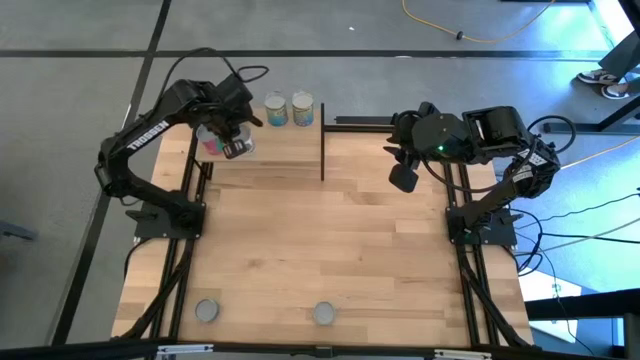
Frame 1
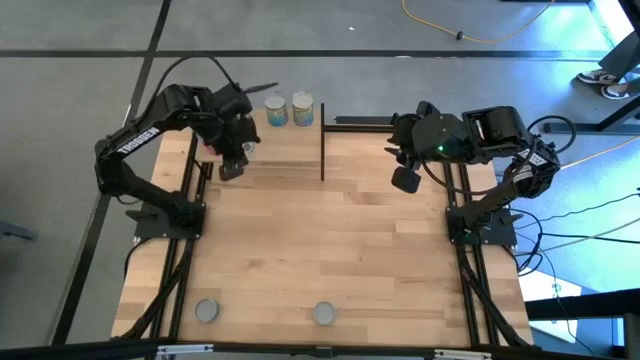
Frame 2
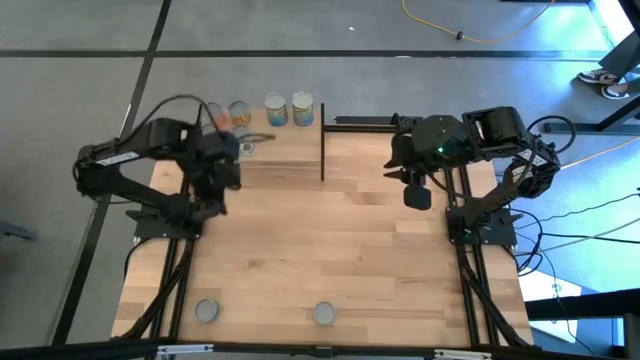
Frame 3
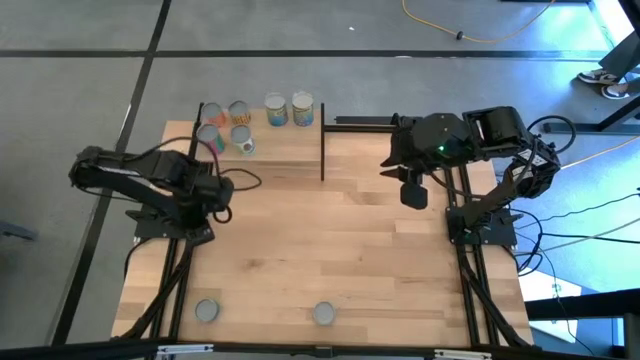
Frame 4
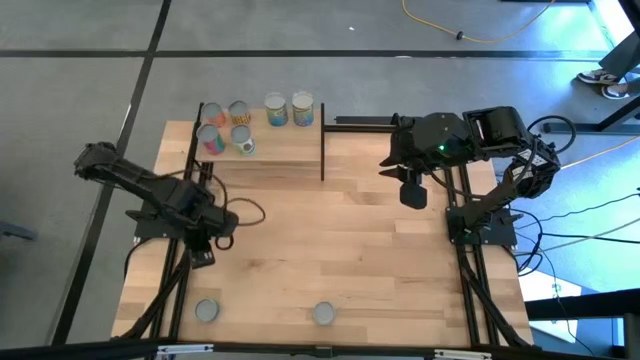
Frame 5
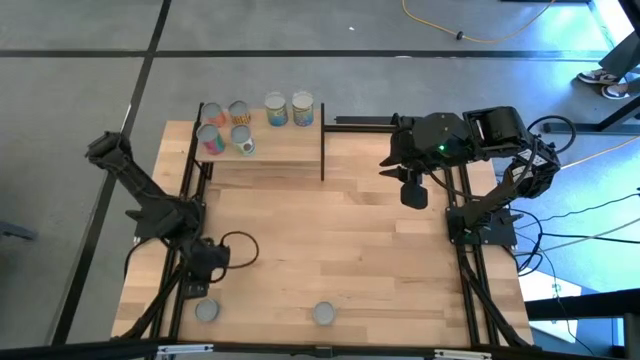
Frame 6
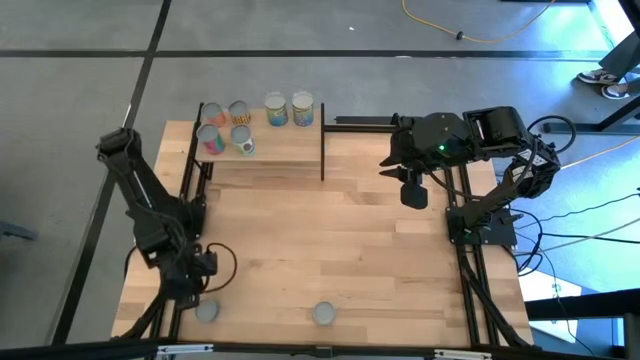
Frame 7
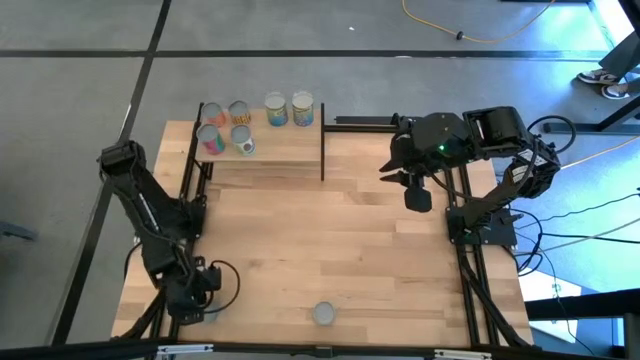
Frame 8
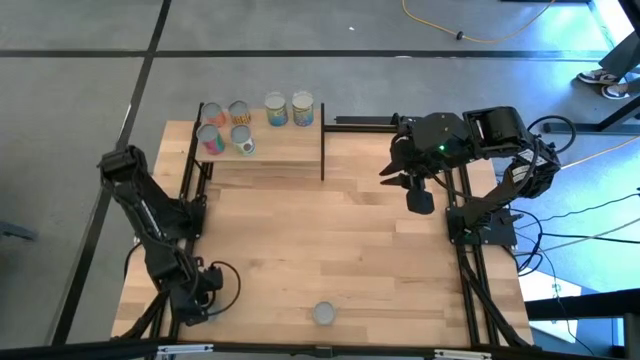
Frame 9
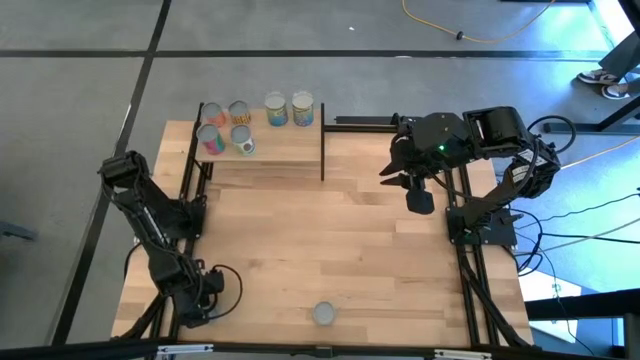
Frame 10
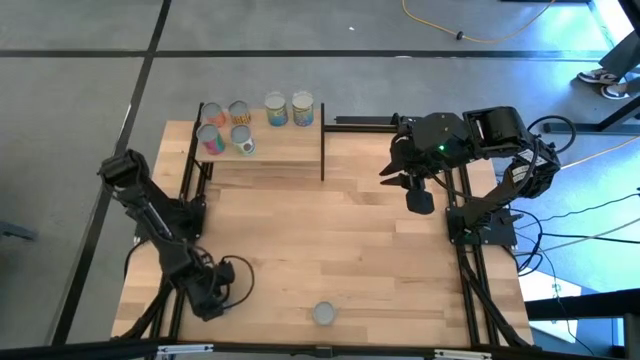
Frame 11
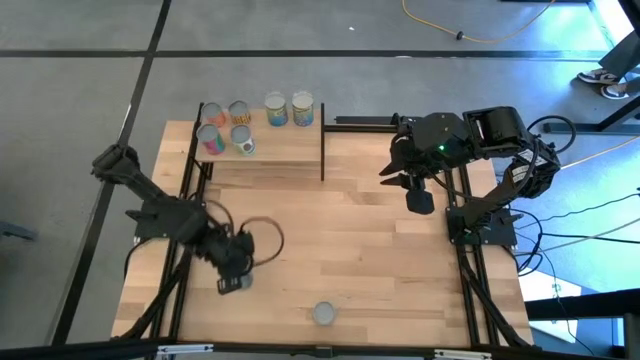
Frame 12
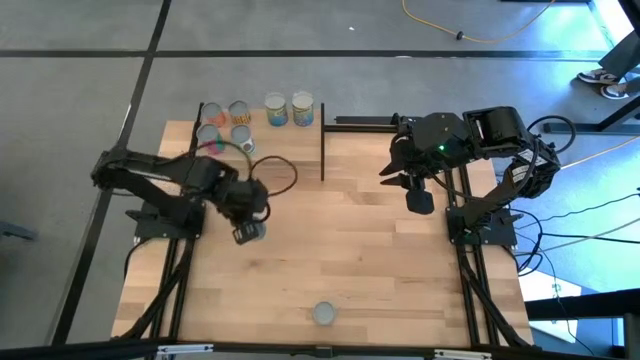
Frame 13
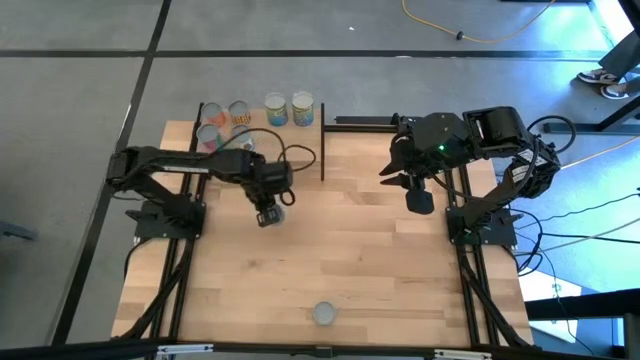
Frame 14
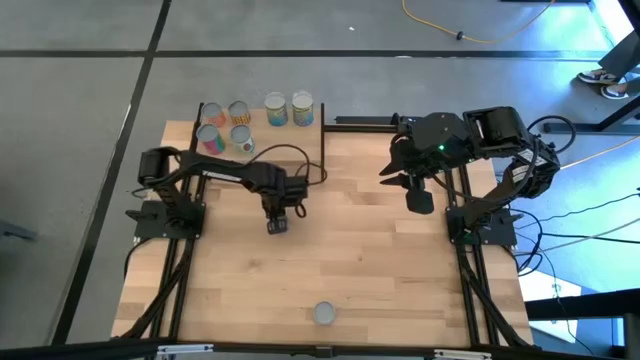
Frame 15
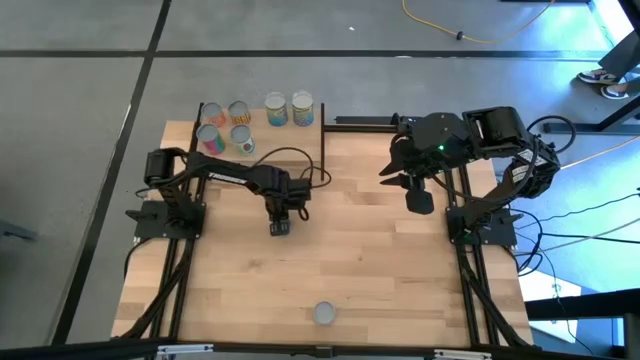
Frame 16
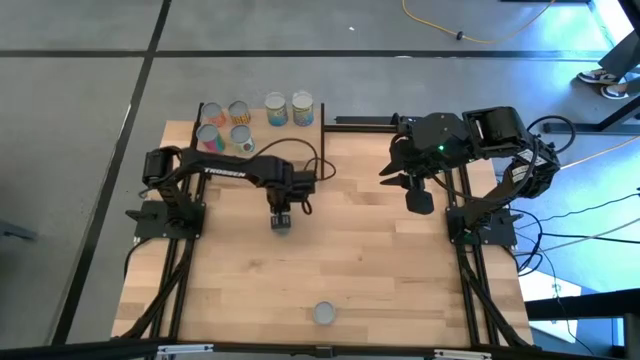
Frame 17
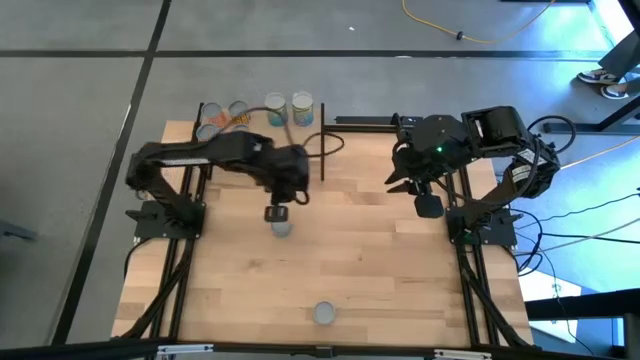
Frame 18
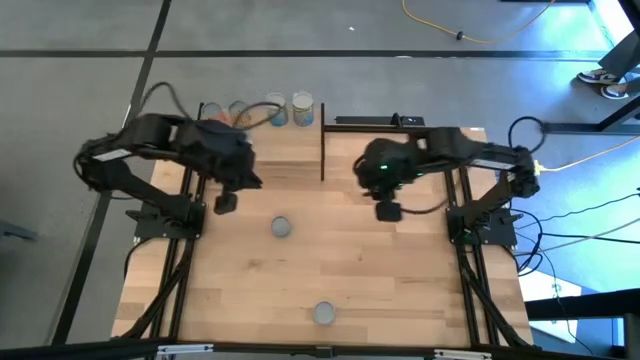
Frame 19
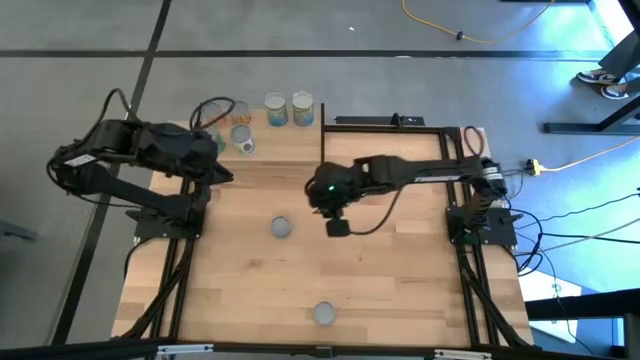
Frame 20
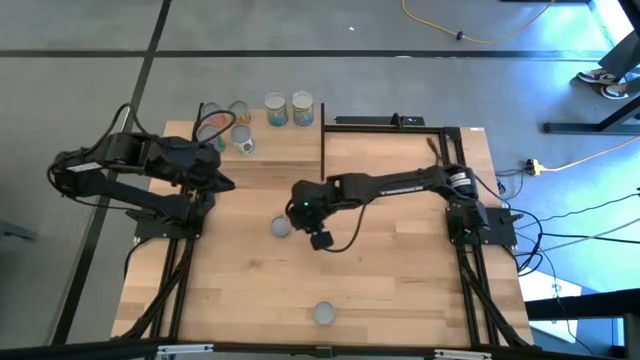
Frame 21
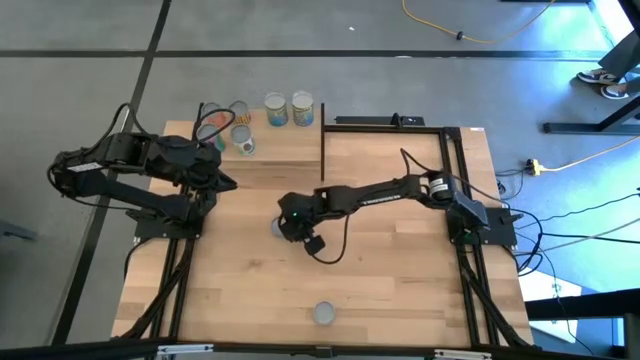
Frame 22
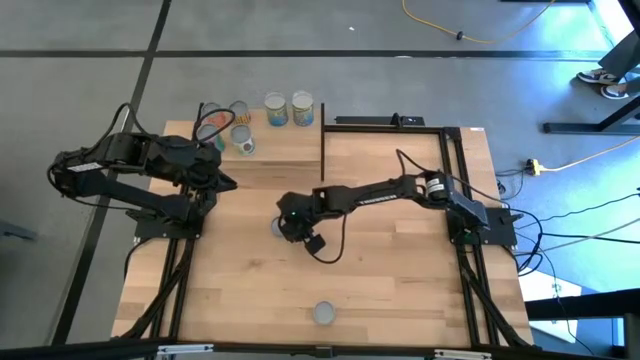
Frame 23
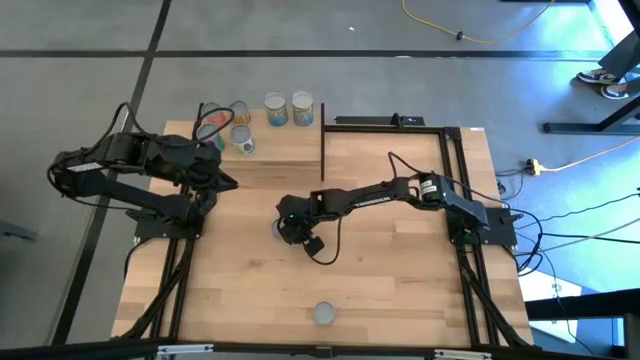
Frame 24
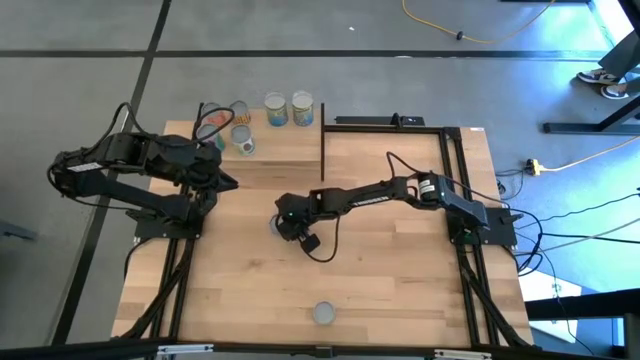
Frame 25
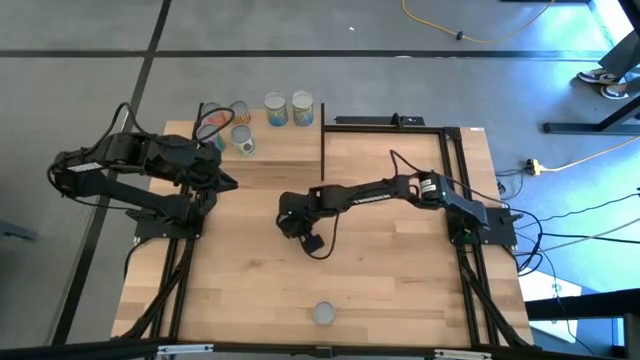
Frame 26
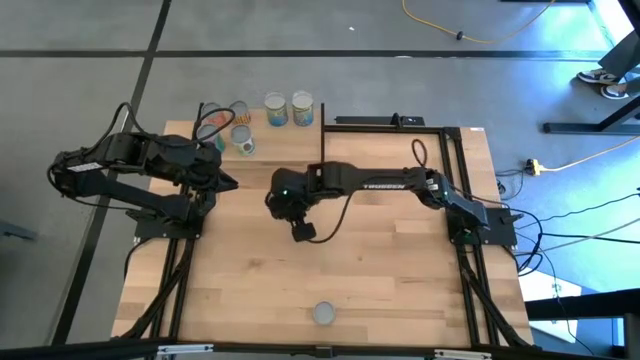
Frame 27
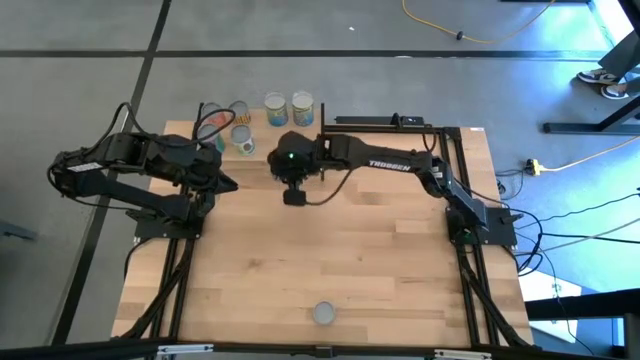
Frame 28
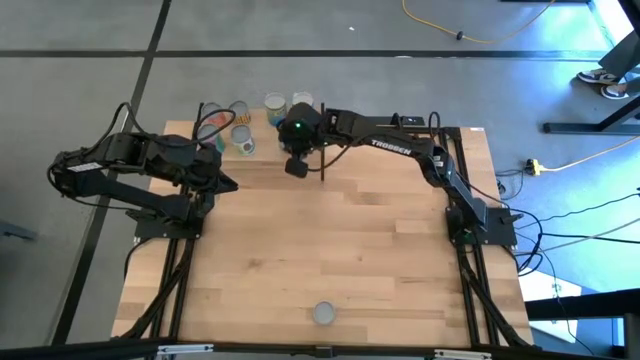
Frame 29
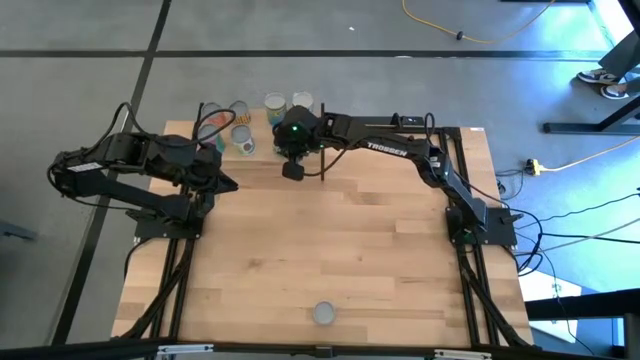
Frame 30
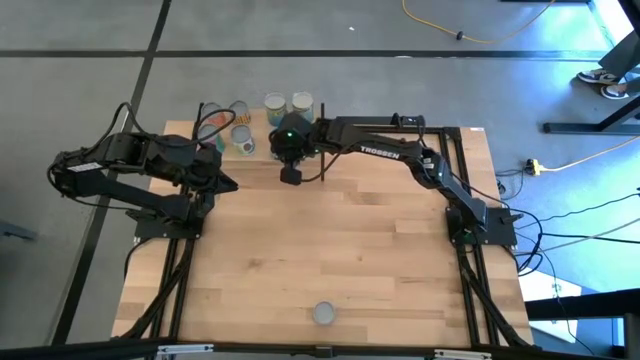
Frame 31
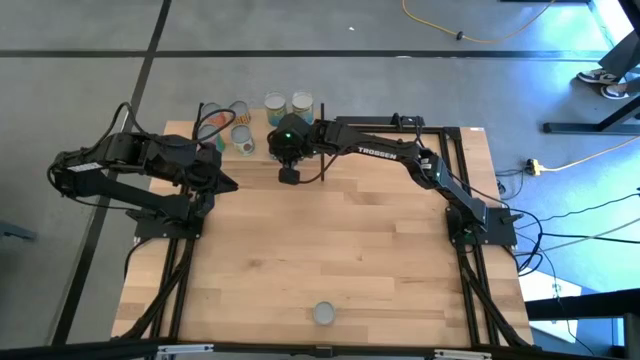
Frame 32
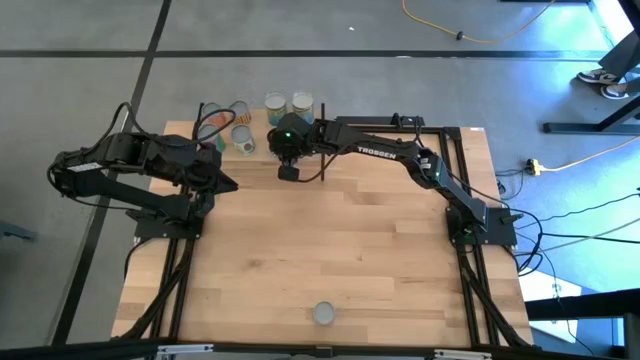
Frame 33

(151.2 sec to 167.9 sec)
Task: Pick and place cans onto a shelf
Put the blue tuna can on the shelf

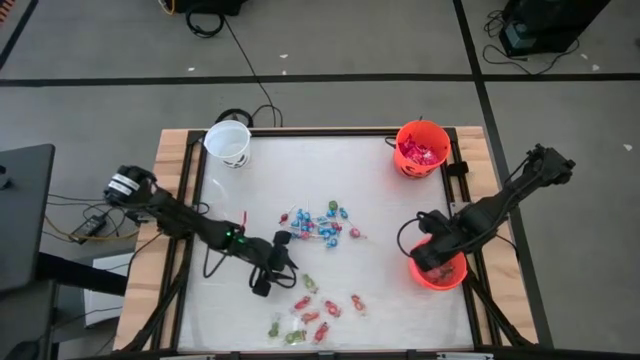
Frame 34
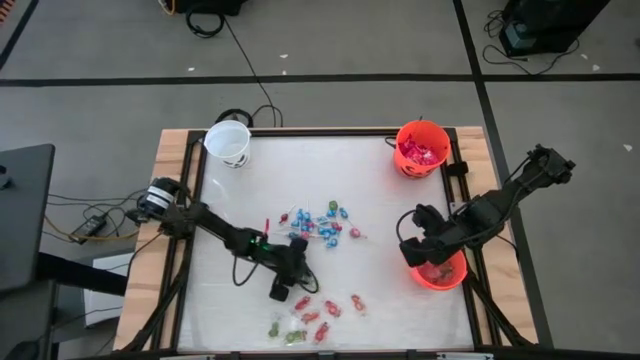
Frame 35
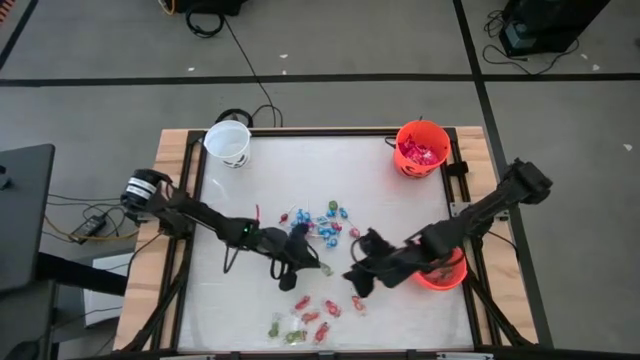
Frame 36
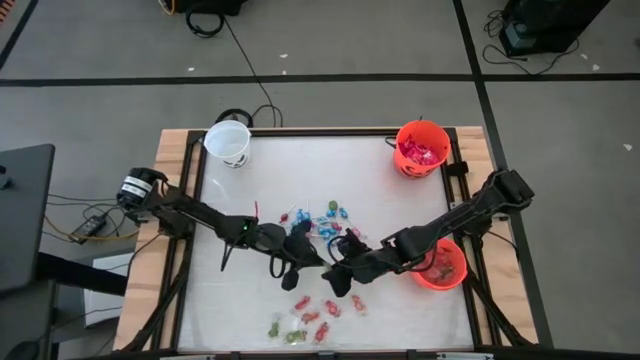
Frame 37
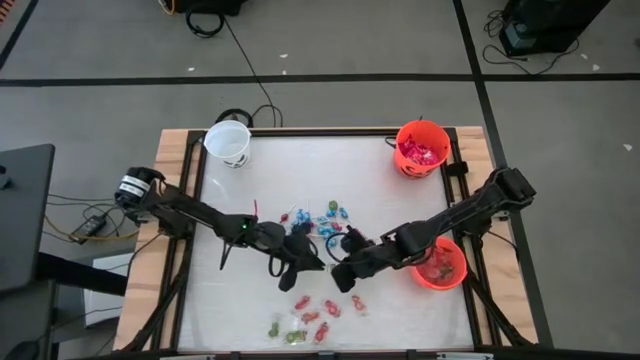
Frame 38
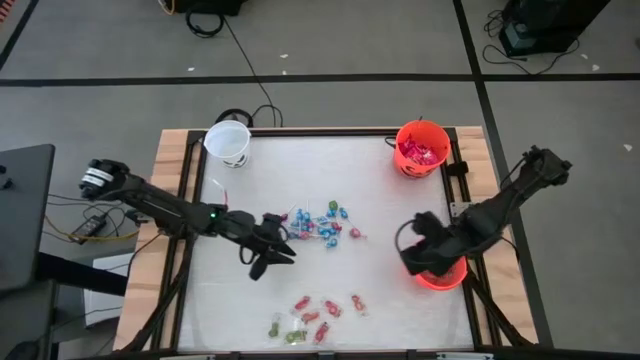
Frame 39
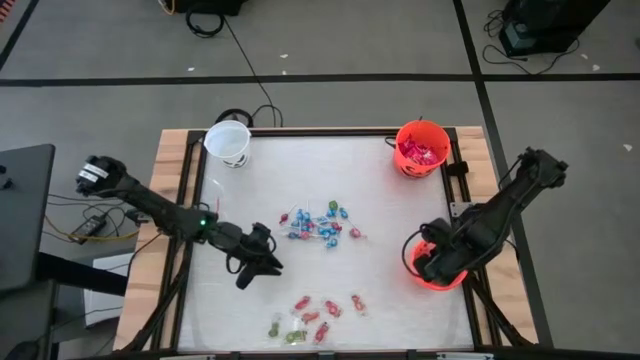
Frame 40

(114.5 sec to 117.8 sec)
Task: Sort candy by brand, put in halloween buckets
Put the green gummy into the bottom orange bucket

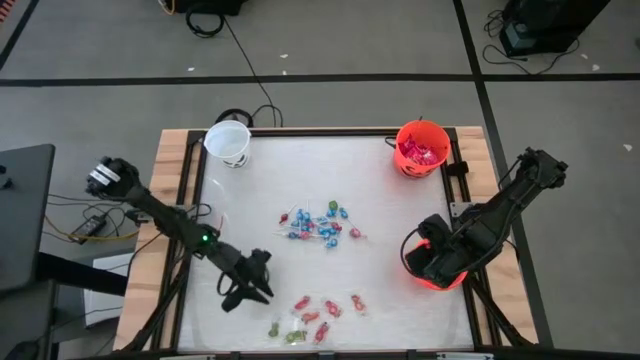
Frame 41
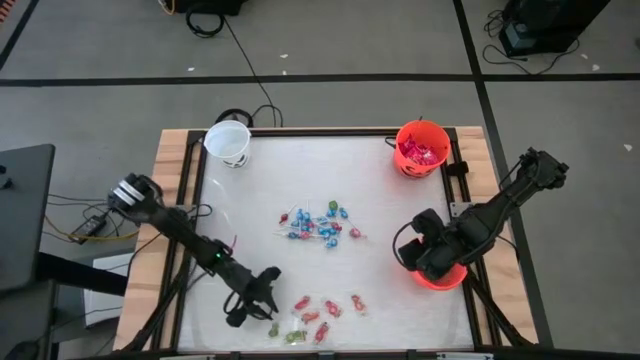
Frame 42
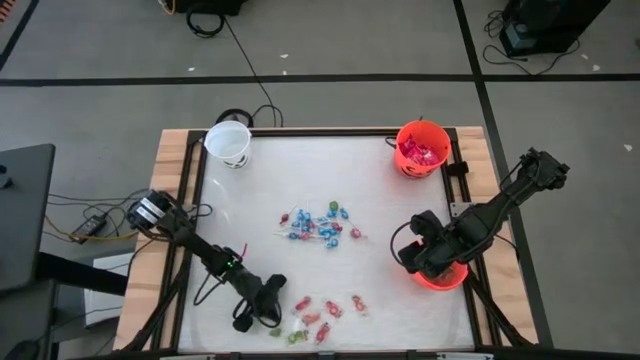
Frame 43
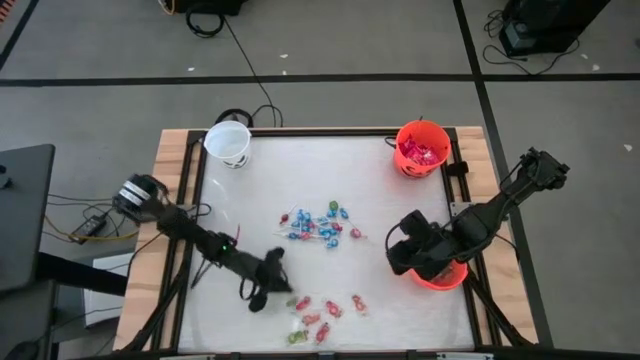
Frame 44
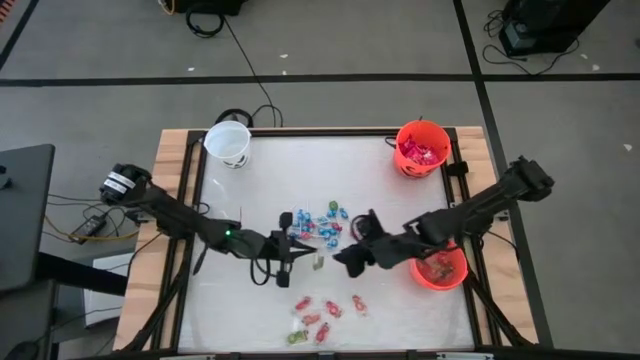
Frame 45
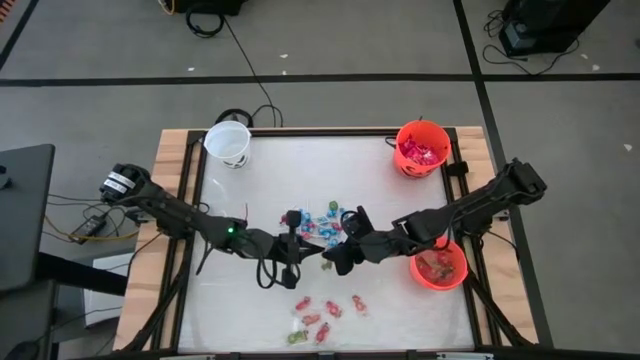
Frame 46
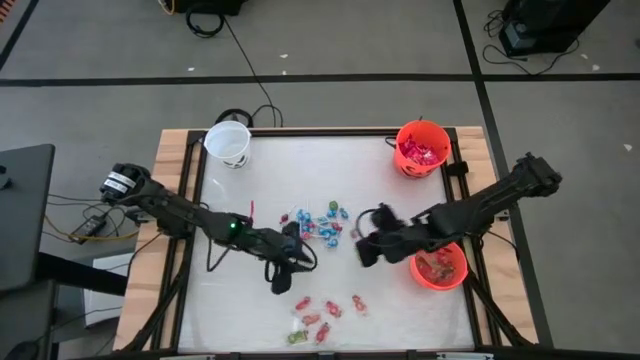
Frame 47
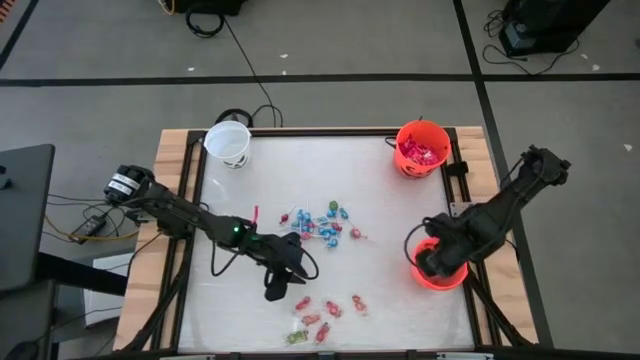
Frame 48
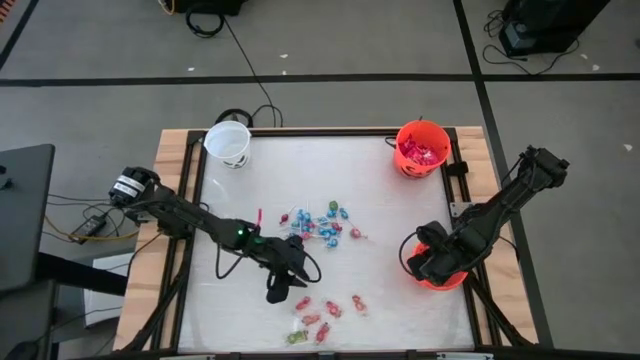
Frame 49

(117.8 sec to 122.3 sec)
Put the green gummy into the bottom orange bucket
